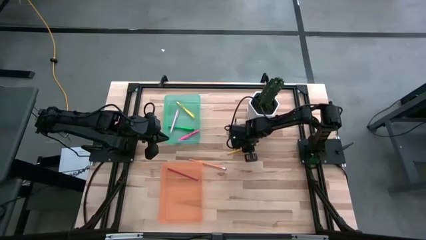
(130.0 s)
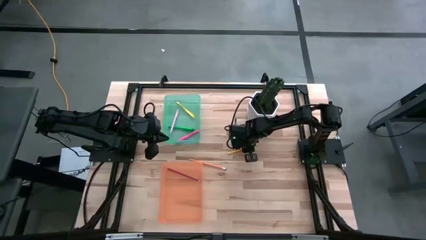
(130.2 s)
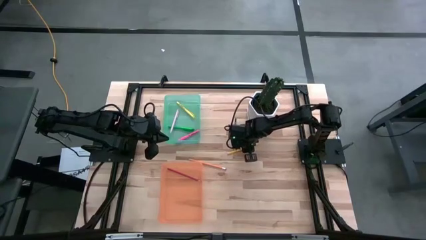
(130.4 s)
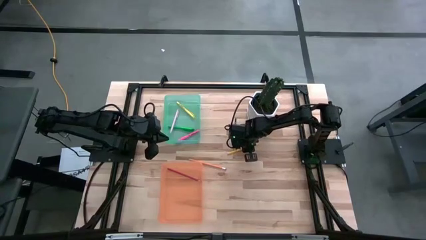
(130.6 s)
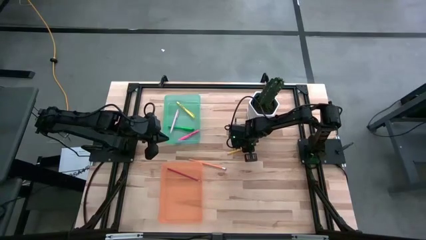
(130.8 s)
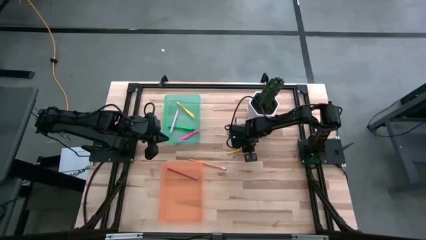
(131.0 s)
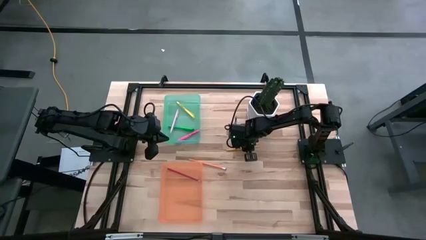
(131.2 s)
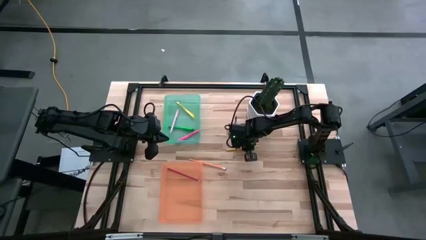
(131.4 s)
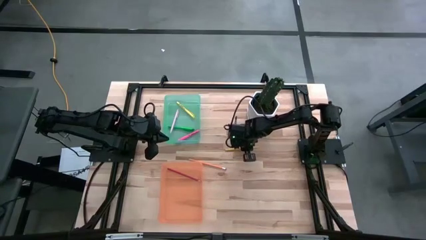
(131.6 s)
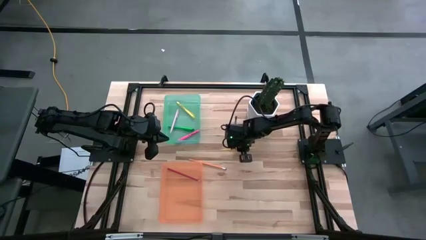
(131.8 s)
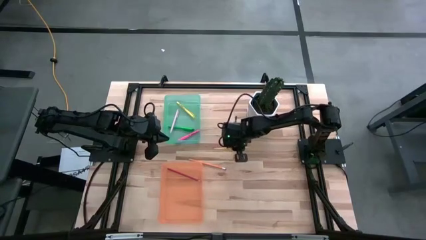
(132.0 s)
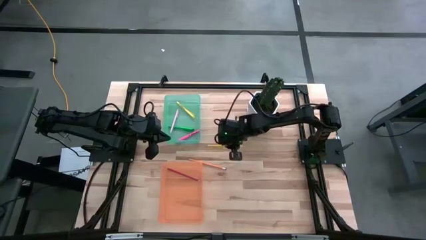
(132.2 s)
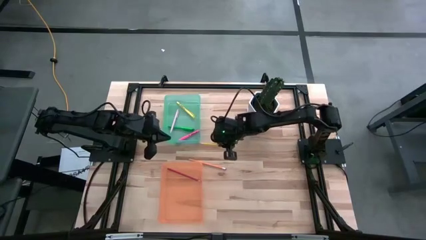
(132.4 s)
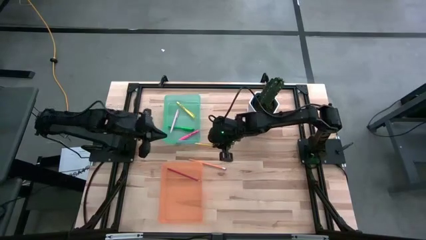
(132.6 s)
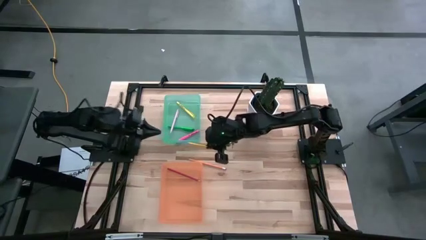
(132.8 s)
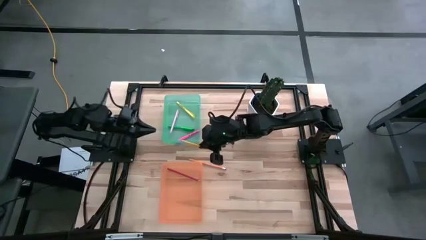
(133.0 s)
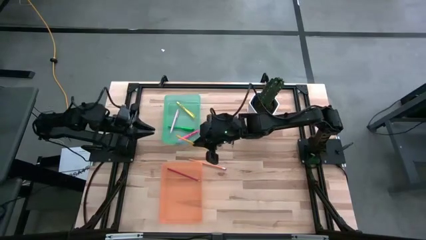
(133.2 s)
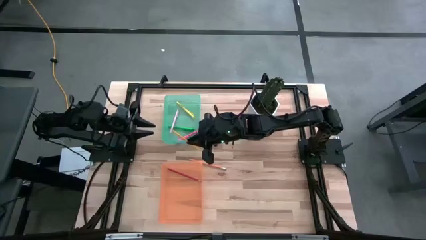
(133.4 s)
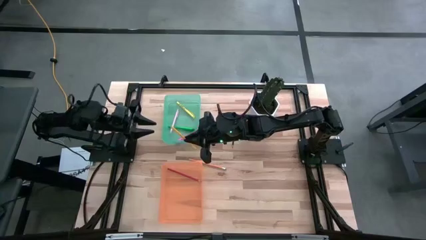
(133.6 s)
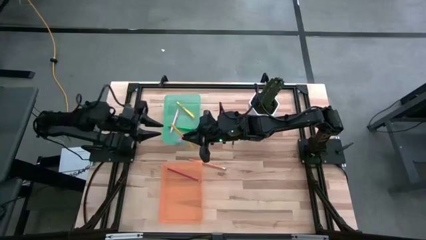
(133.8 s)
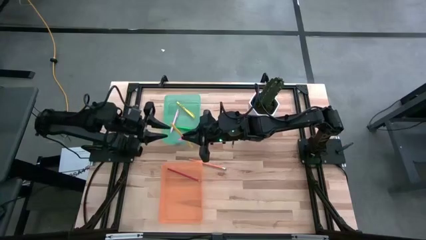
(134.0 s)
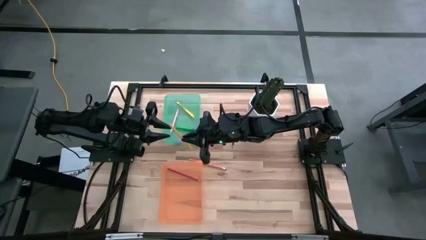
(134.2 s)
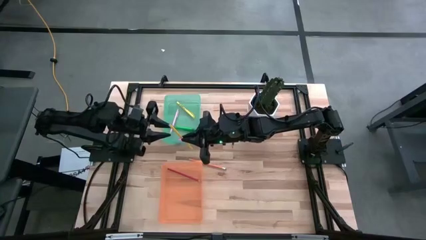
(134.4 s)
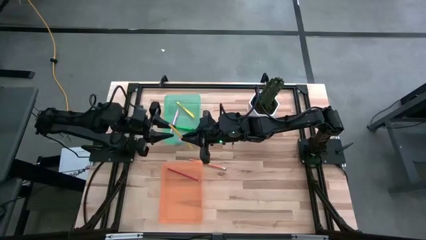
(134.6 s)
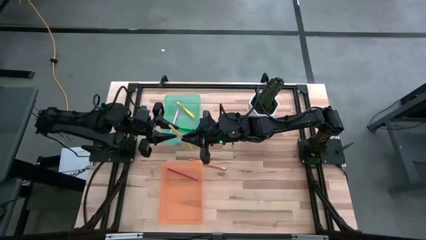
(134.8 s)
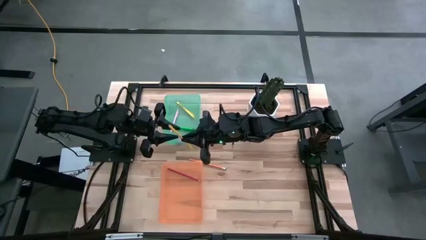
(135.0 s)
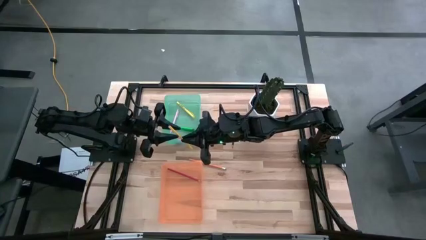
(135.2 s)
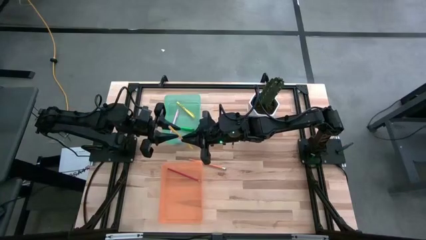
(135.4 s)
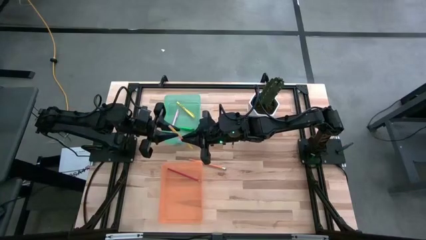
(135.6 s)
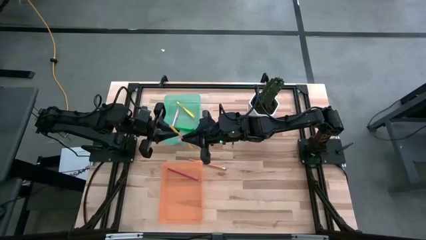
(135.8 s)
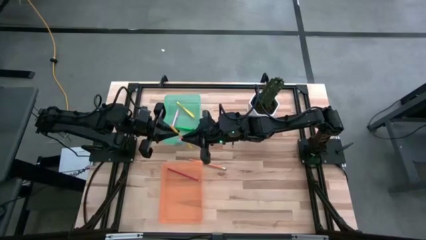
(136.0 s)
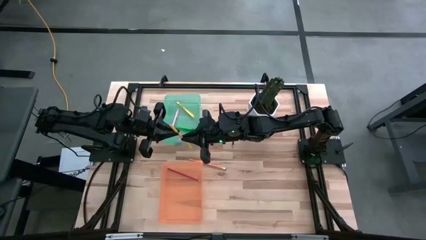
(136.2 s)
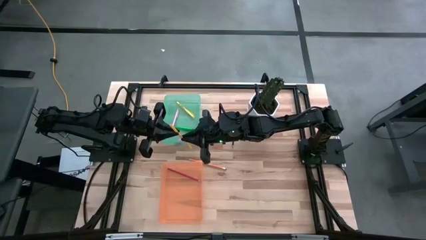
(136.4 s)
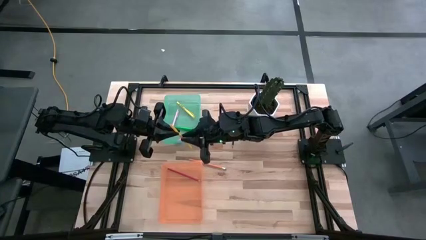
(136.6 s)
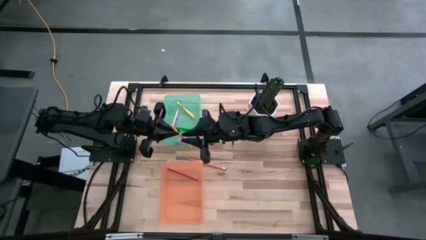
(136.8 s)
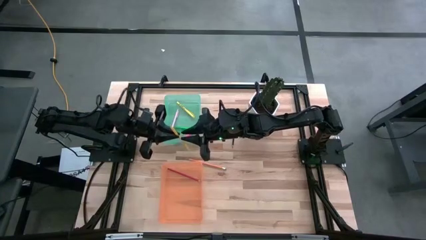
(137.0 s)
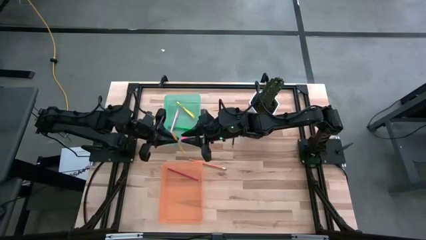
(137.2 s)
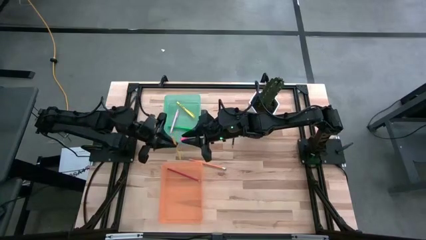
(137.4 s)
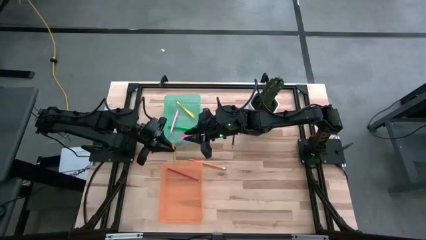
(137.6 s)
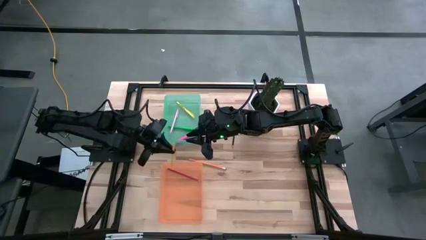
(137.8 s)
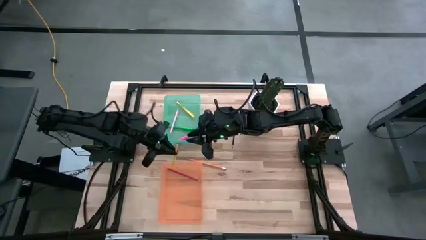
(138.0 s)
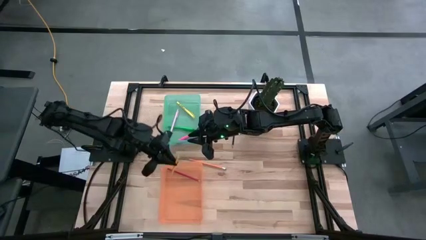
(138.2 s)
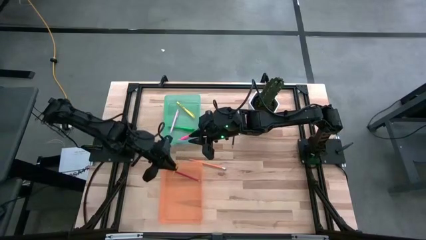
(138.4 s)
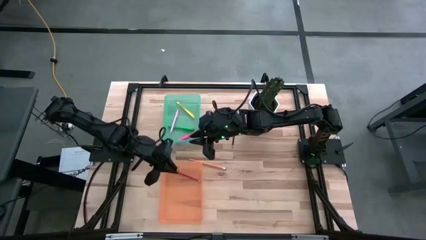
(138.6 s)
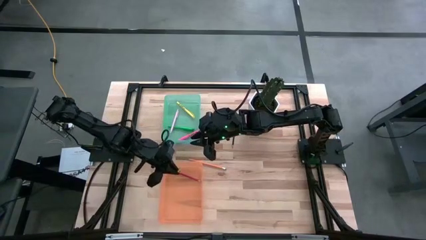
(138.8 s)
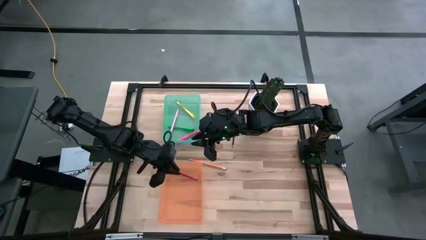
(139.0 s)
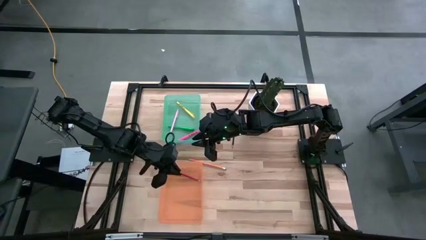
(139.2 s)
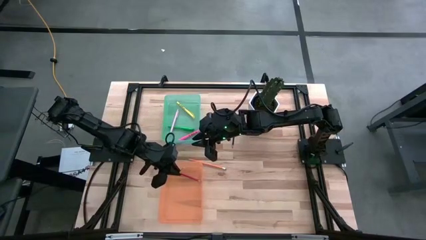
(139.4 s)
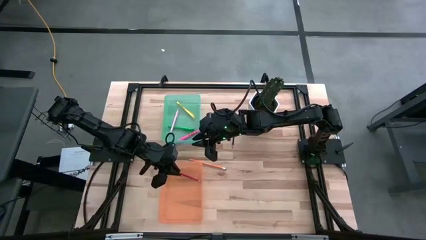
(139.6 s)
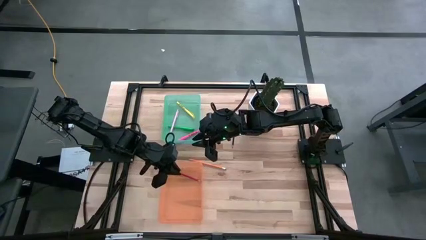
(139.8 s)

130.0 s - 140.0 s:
Task: Sort pens & pencils
Put the yellow pencil into the orange bin

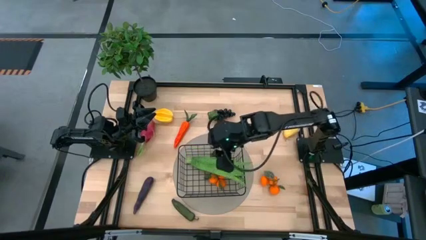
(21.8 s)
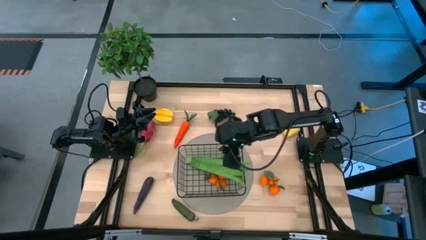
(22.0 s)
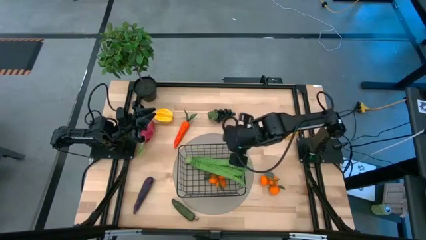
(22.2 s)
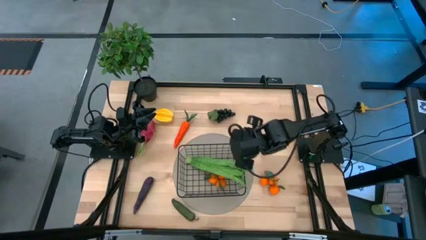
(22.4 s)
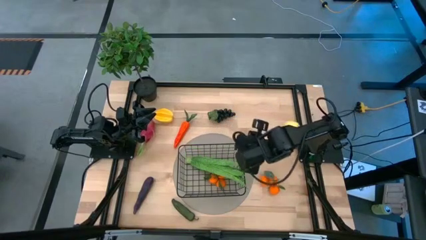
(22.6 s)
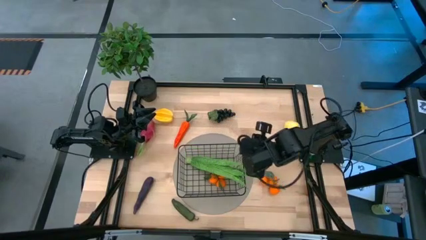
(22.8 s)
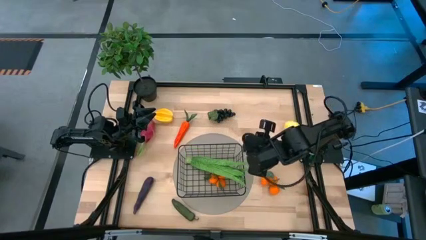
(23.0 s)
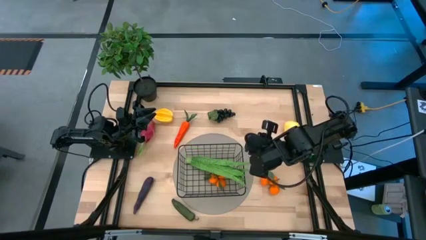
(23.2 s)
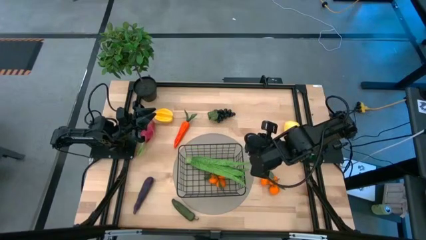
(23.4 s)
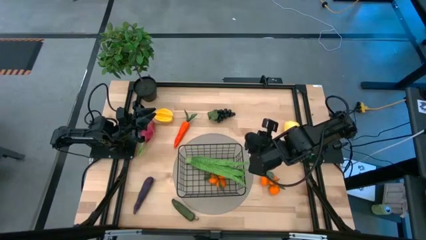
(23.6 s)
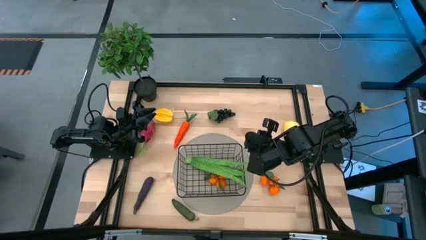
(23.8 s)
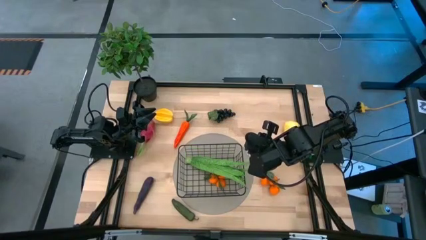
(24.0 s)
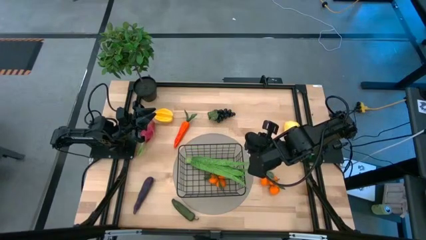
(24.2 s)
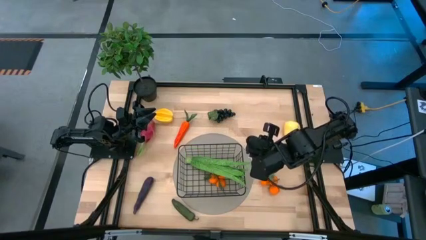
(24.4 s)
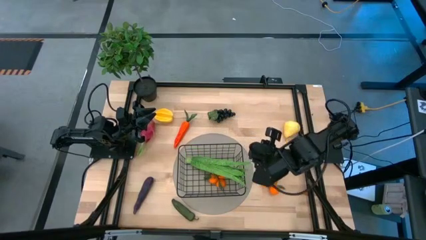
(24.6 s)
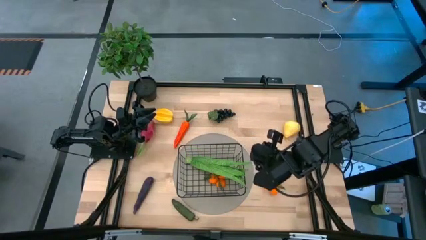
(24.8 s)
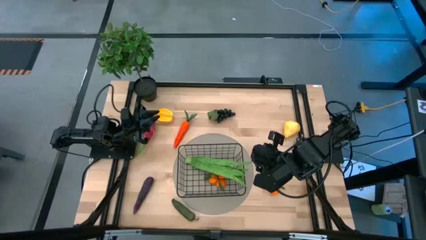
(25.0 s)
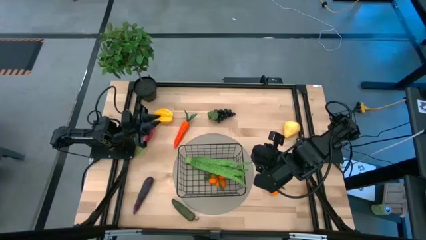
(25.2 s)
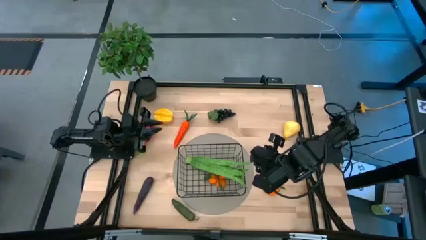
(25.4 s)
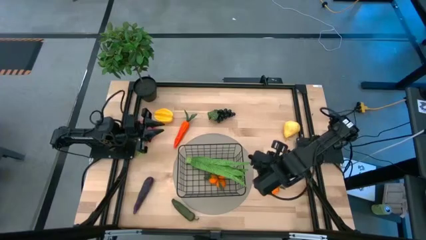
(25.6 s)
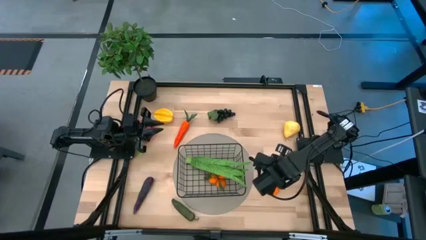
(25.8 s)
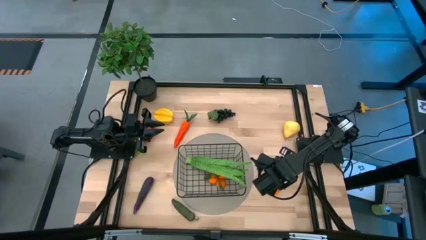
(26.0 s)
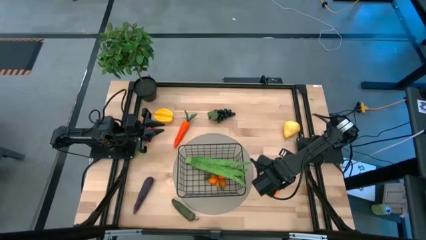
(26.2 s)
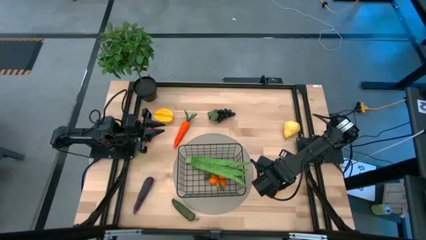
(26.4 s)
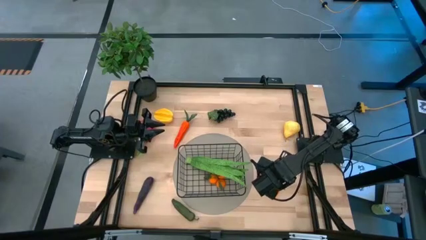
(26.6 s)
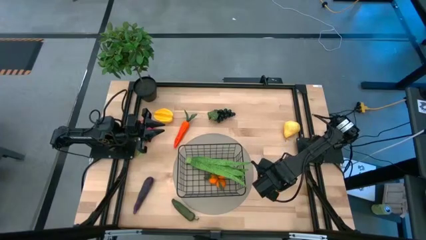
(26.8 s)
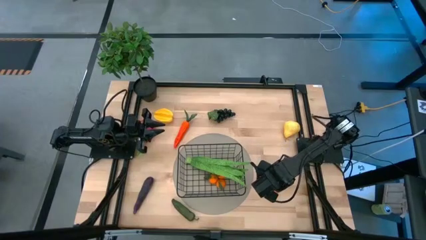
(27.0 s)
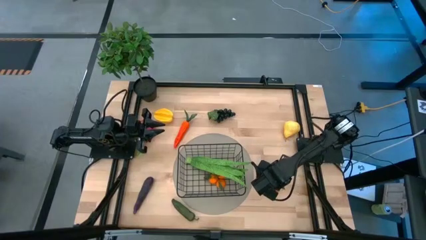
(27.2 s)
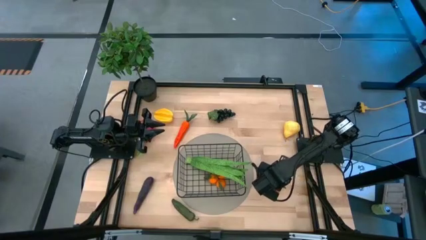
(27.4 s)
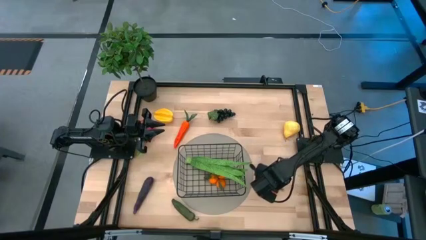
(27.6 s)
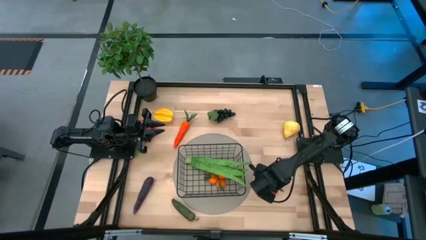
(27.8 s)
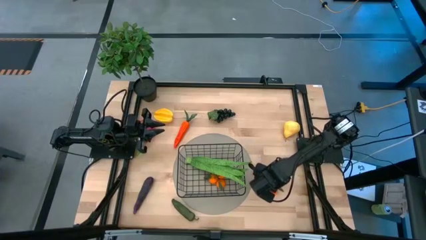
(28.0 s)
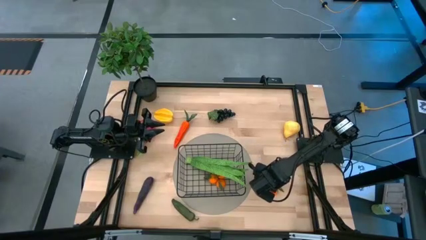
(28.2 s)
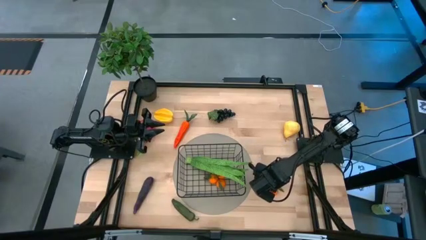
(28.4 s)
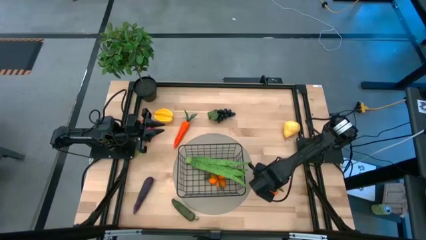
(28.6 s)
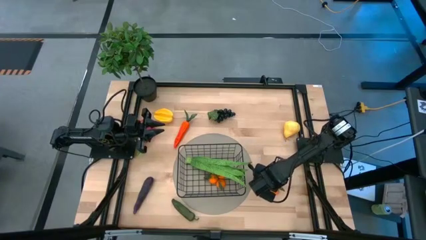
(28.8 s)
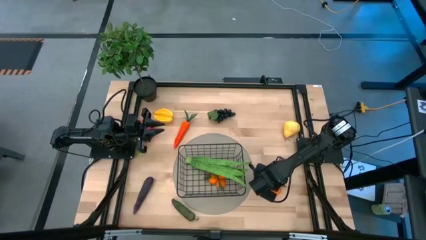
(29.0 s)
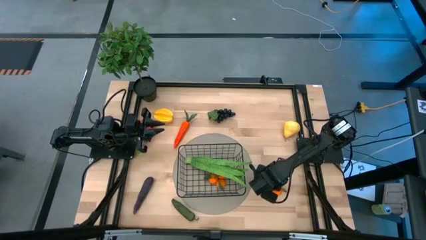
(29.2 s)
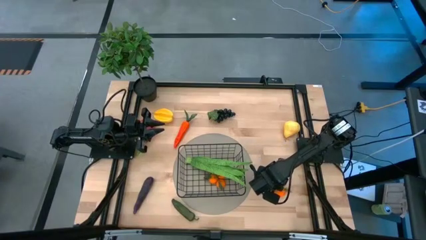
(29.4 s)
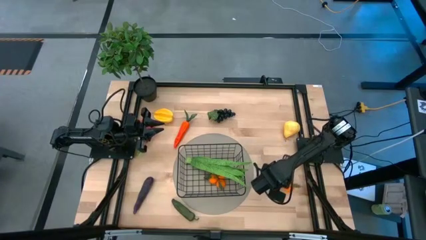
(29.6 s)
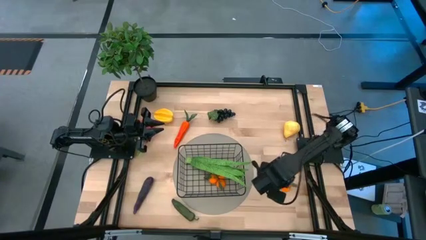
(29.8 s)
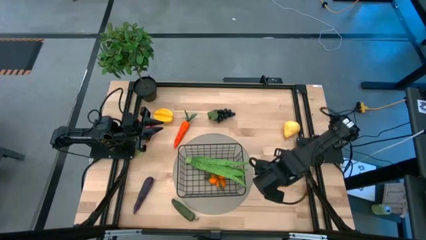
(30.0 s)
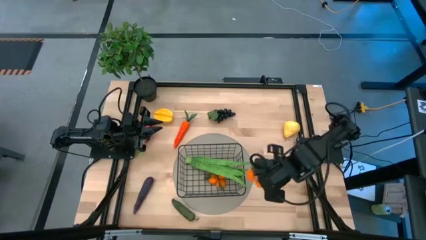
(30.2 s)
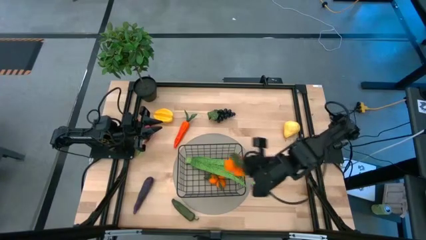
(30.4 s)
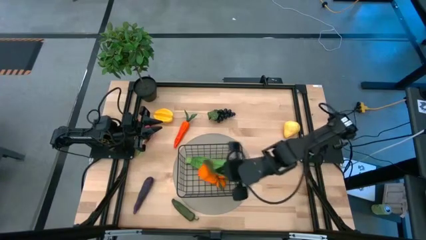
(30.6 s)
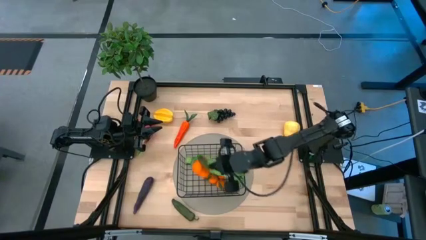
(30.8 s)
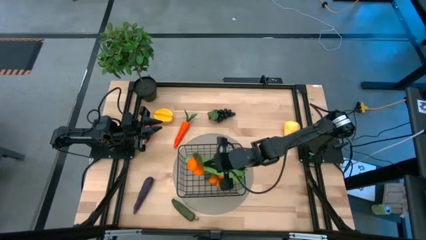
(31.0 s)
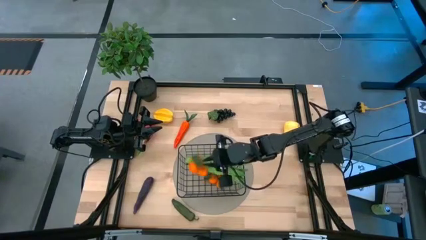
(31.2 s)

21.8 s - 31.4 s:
Task: Build produce basket
Put the tangerine into the black basket
